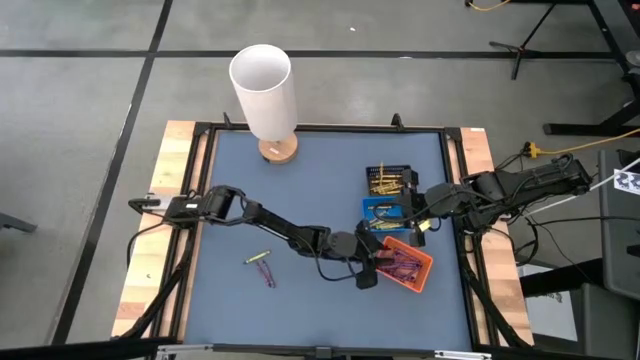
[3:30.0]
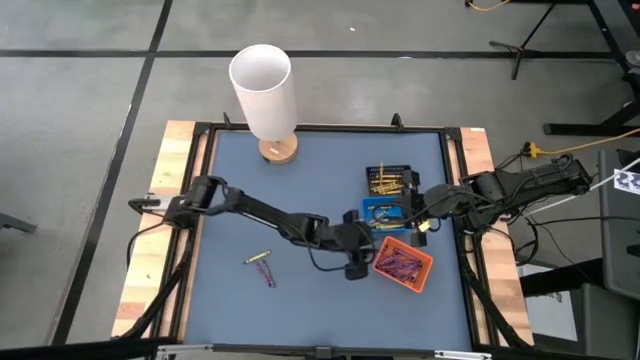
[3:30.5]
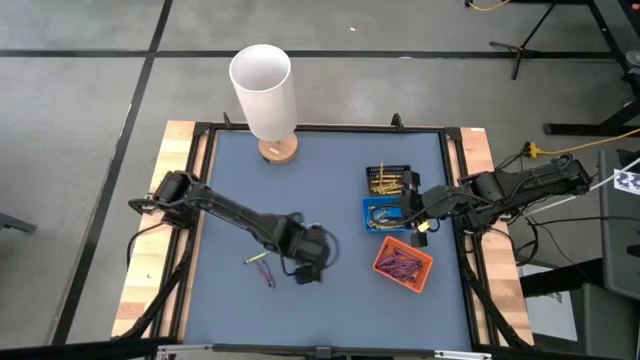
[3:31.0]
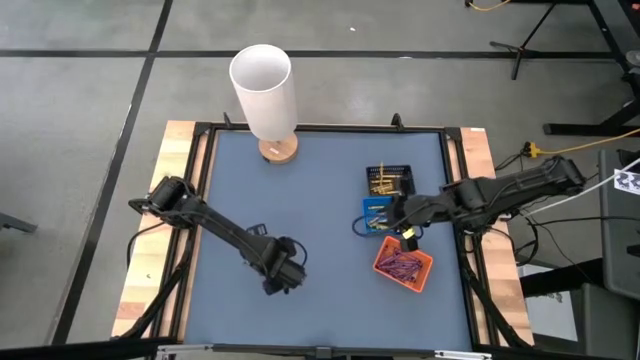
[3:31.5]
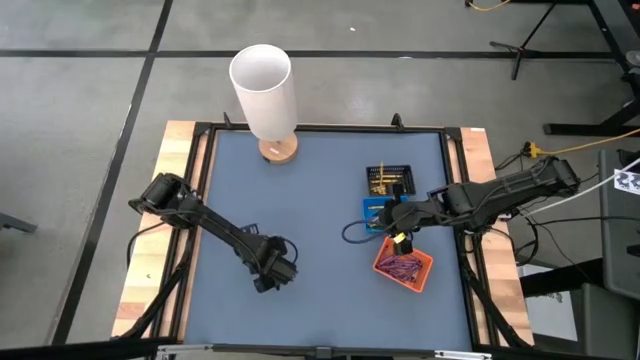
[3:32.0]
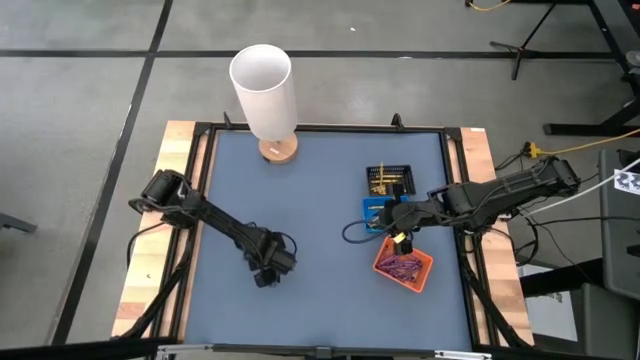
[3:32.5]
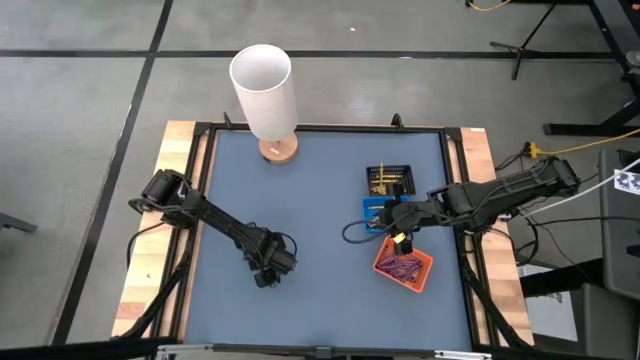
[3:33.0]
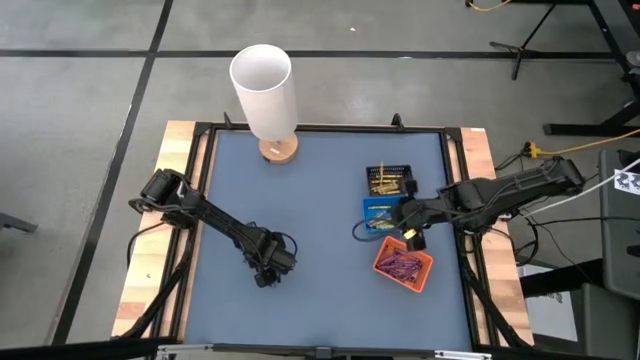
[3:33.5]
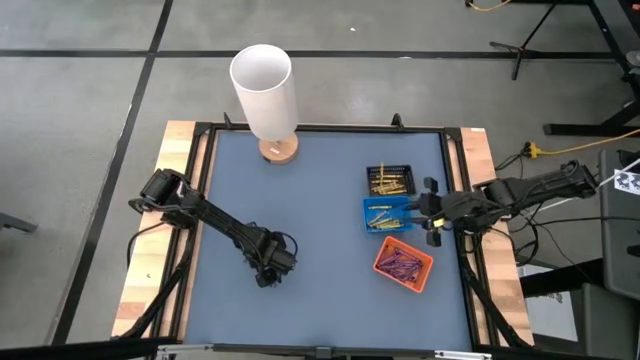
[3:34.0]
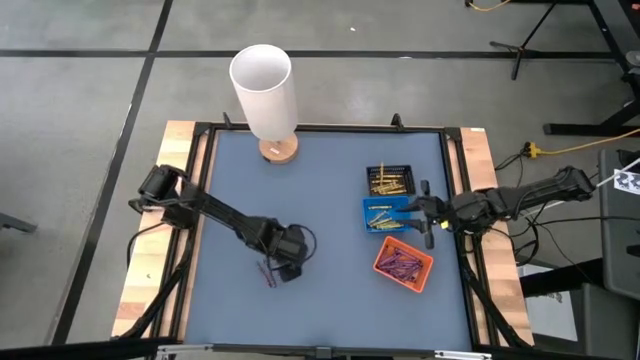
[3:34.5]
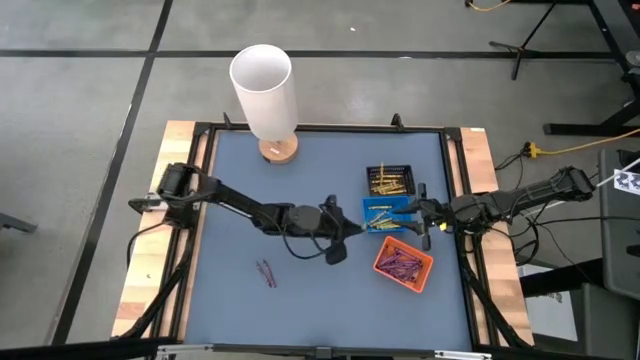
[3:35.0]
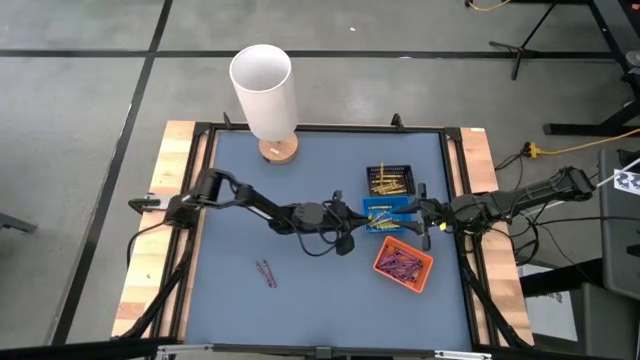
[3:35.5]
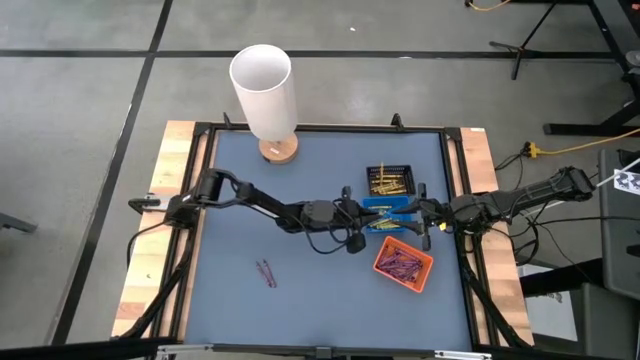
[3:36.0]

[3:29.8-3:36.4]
Task: Sort crayons
Put the green crayon into the blue bin

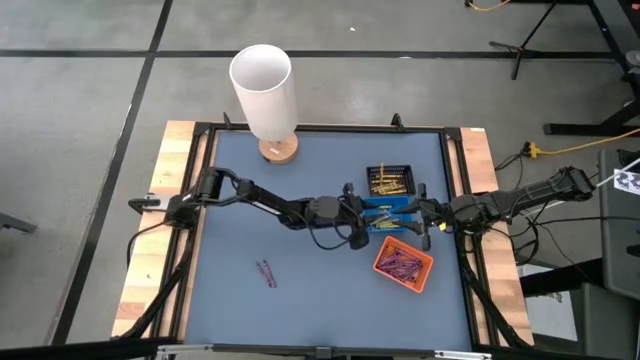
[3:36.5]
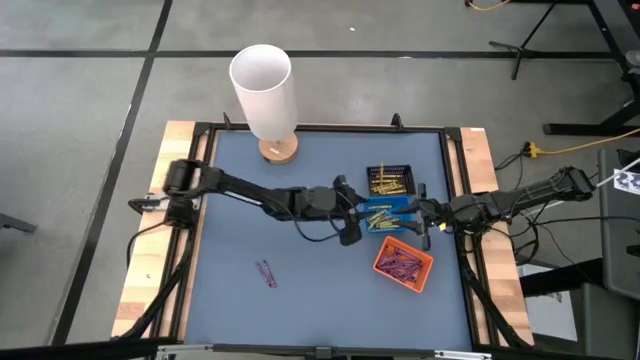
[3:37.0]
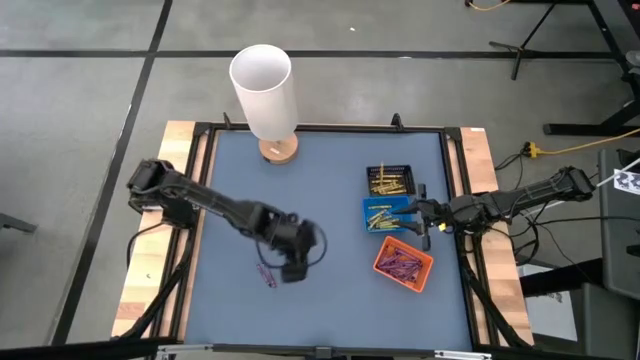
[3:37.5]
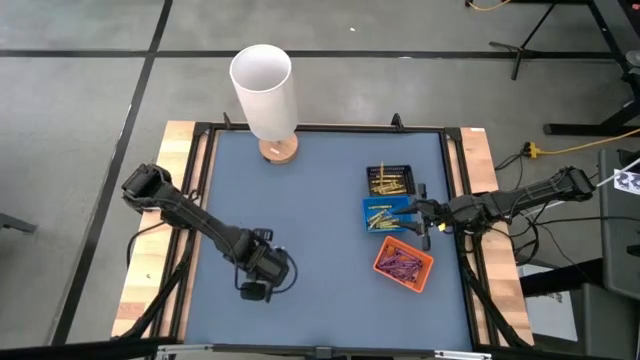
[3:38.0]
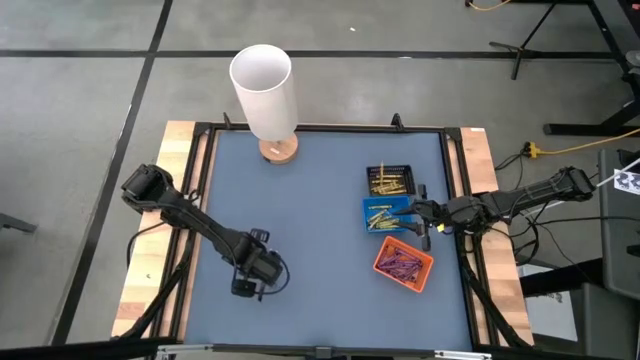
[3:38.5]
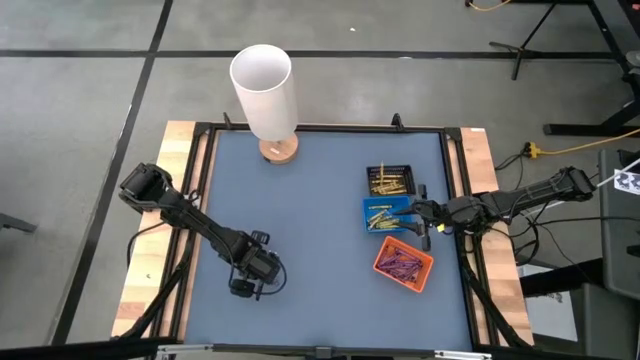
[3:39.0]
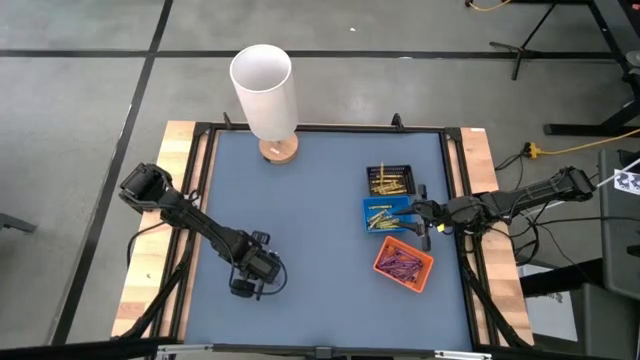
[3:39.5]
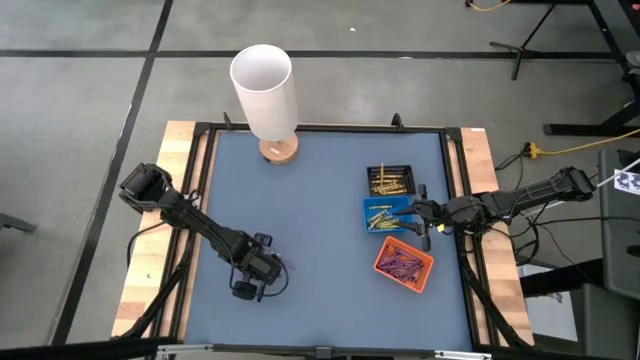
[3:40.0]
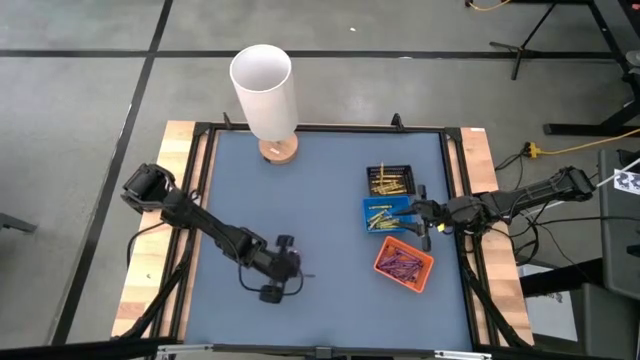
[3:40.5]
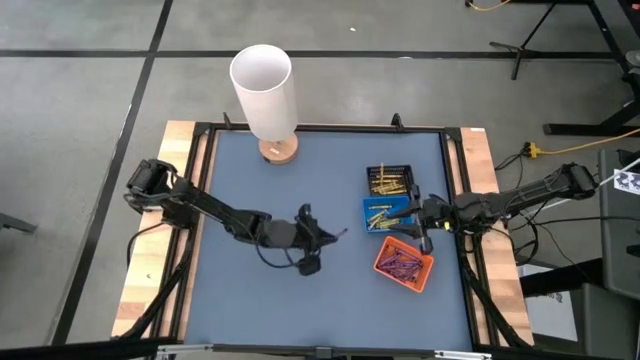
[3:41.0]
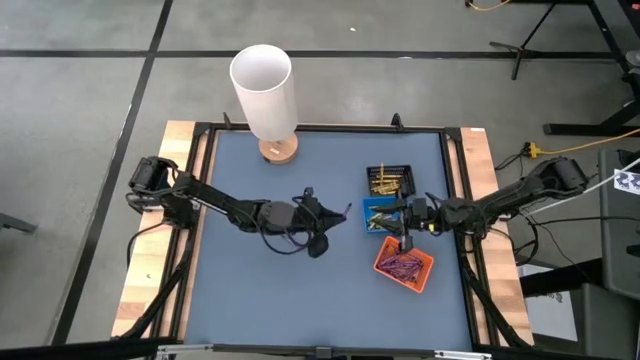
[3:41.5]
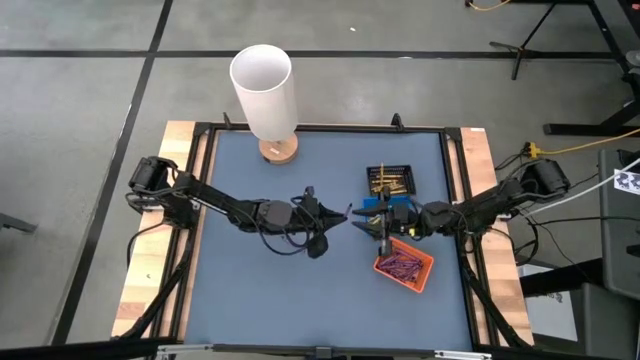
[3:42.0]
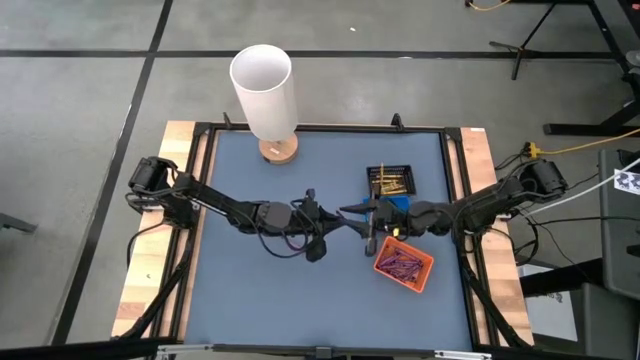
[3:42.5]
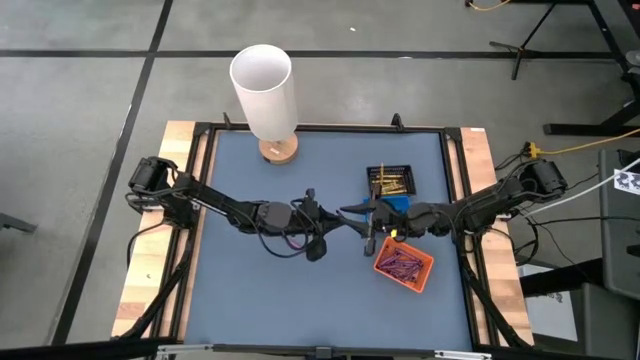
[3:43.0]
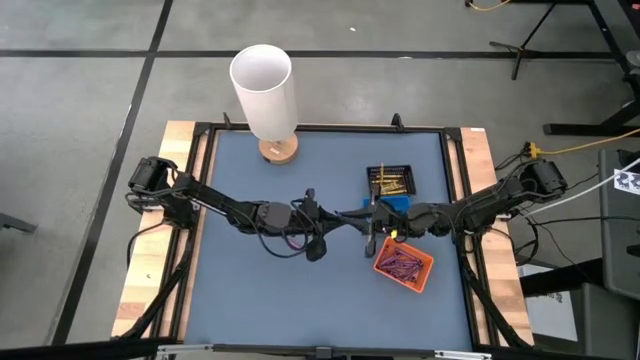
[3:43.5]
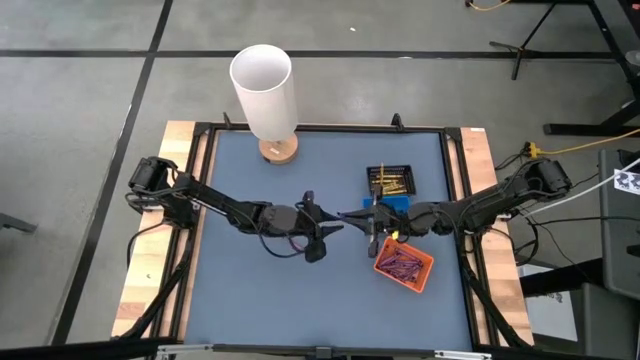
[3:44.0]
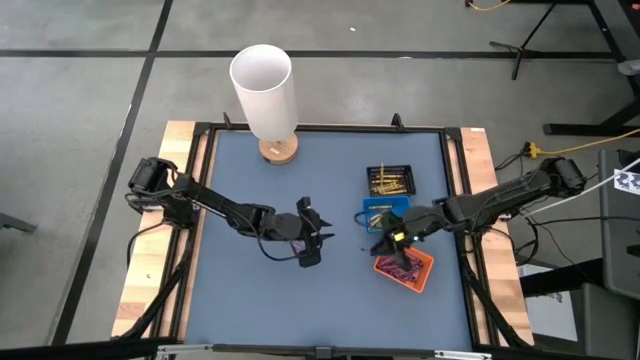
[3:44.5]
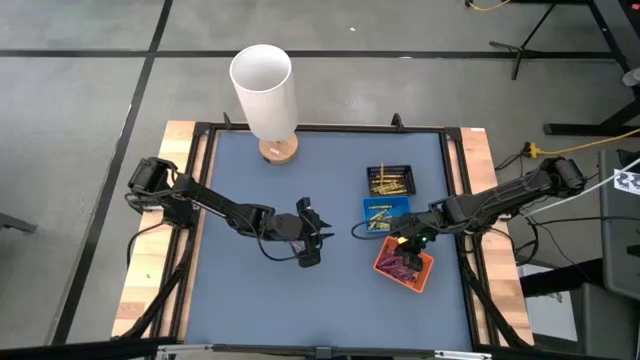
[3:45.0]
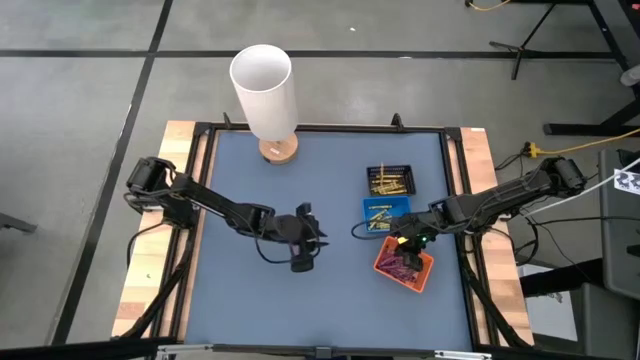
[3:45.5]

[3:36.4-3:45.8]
Put the purple crayon into the orange bin
